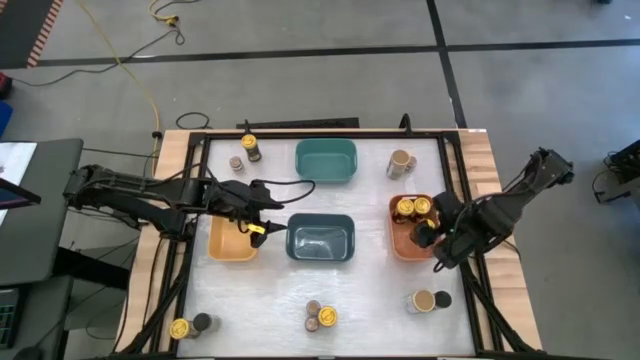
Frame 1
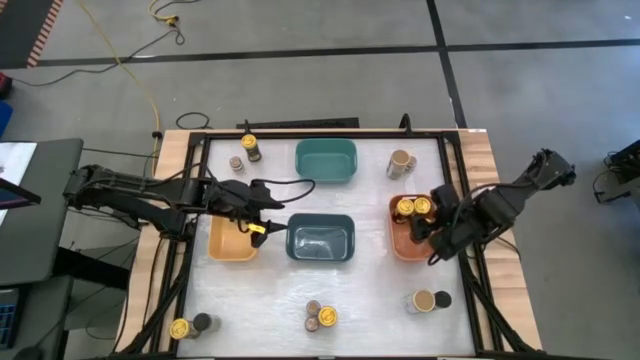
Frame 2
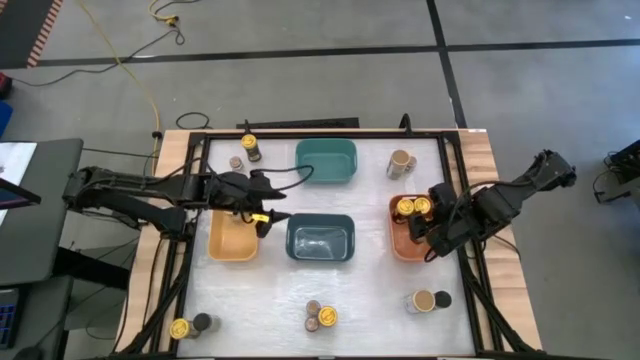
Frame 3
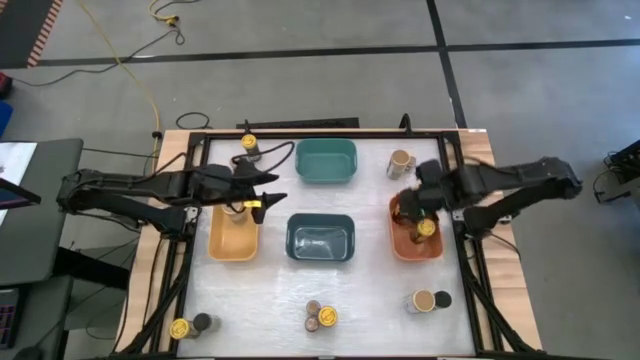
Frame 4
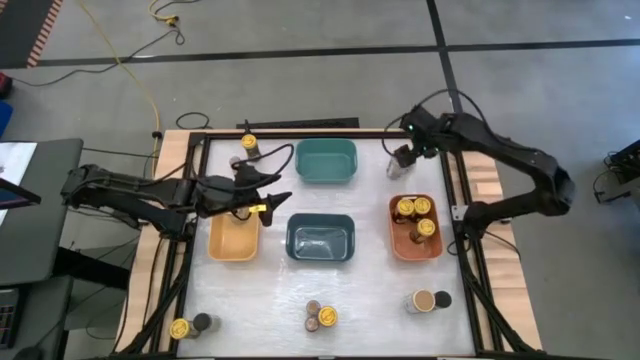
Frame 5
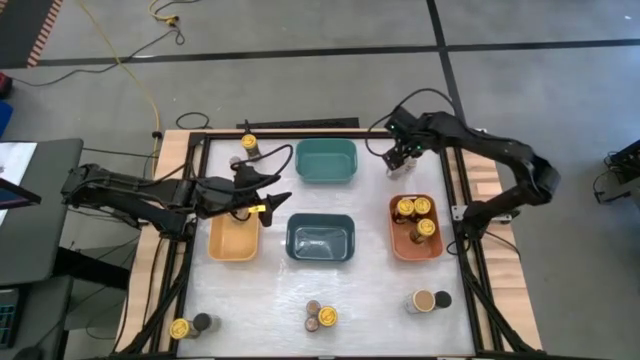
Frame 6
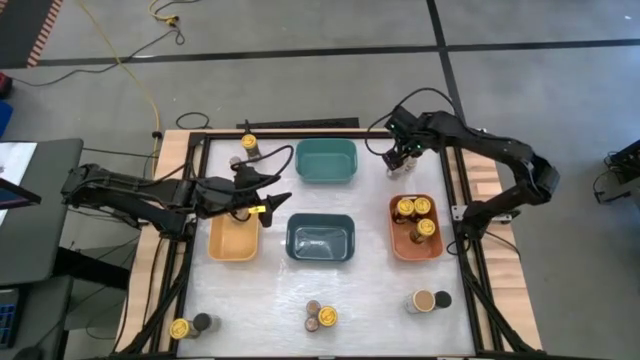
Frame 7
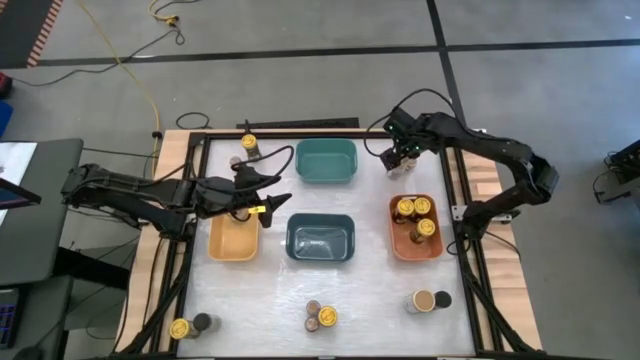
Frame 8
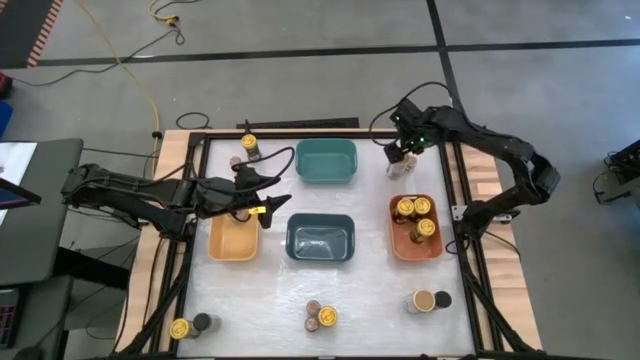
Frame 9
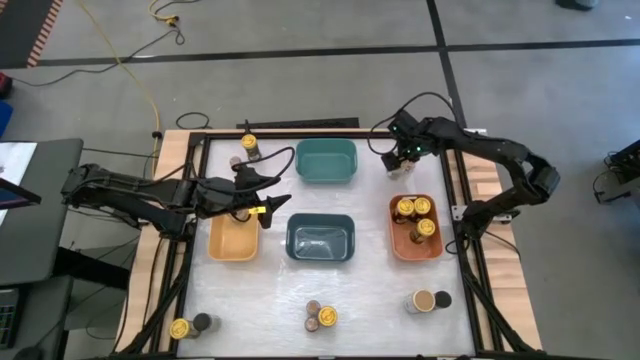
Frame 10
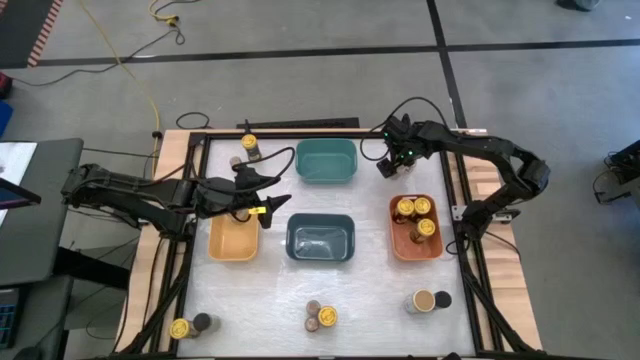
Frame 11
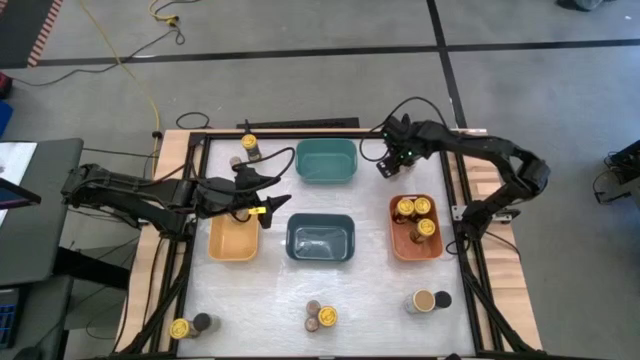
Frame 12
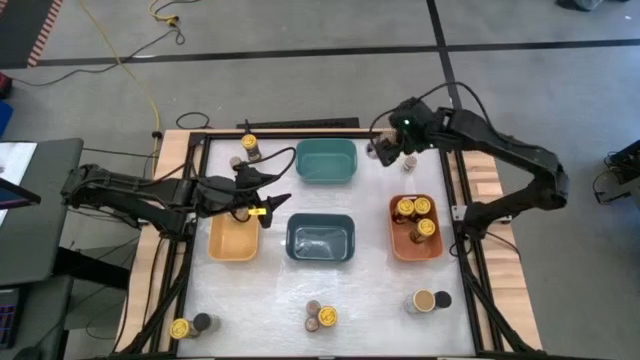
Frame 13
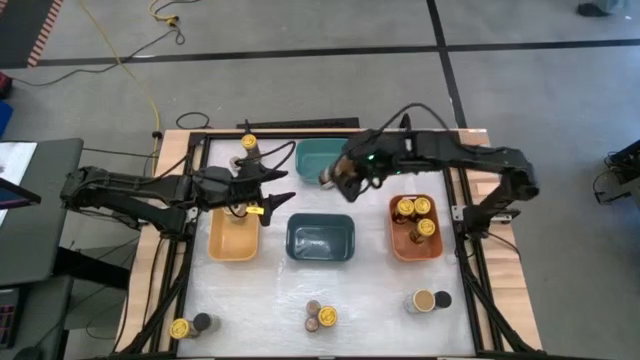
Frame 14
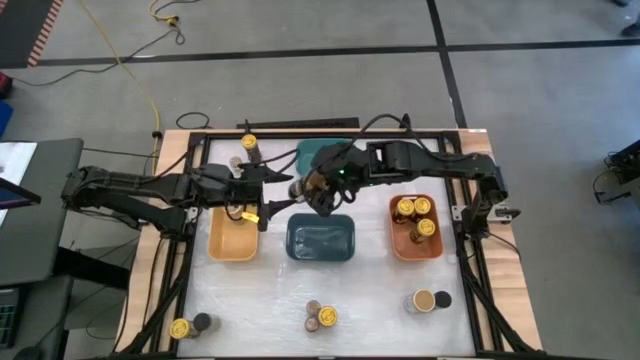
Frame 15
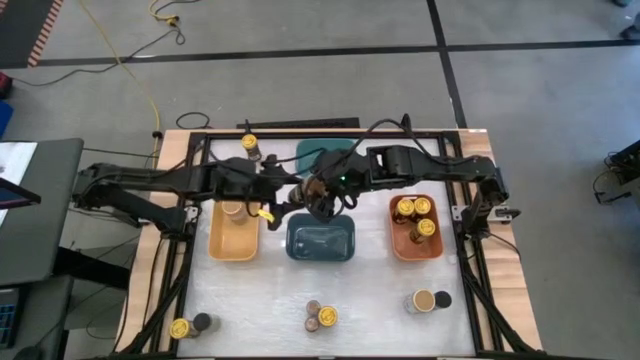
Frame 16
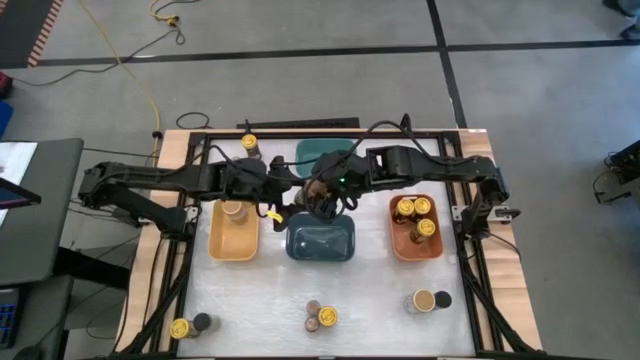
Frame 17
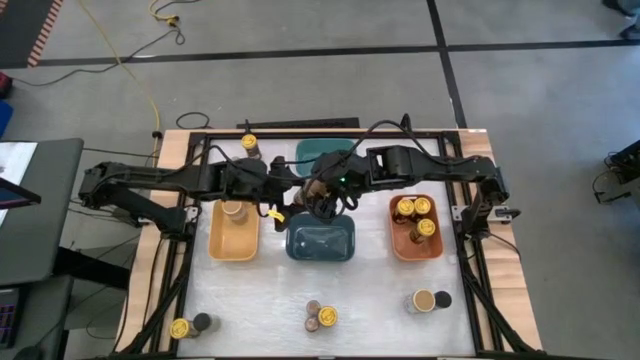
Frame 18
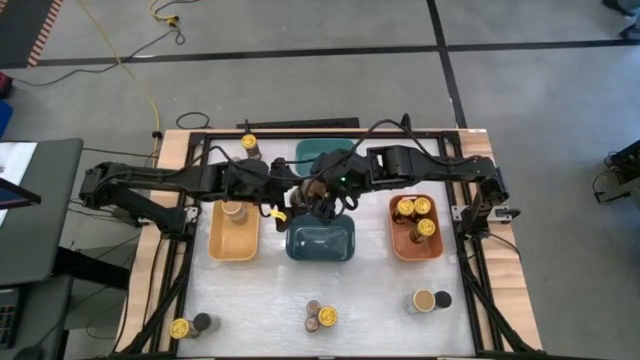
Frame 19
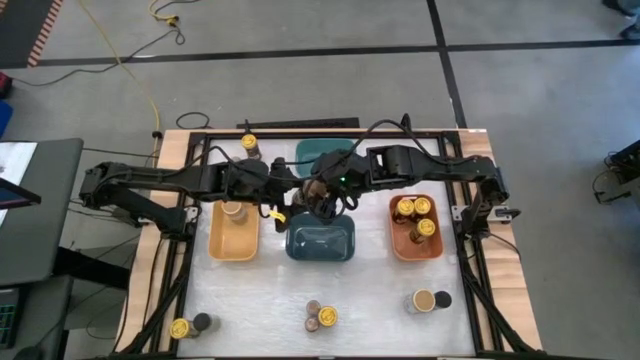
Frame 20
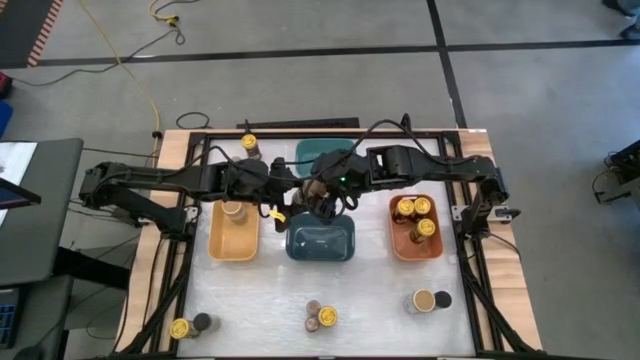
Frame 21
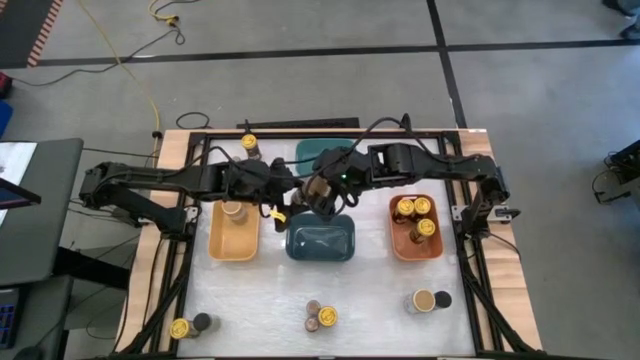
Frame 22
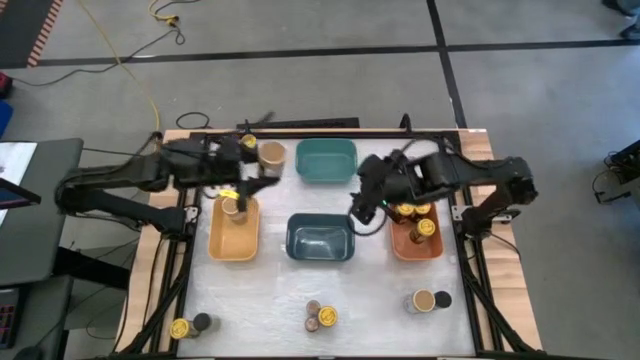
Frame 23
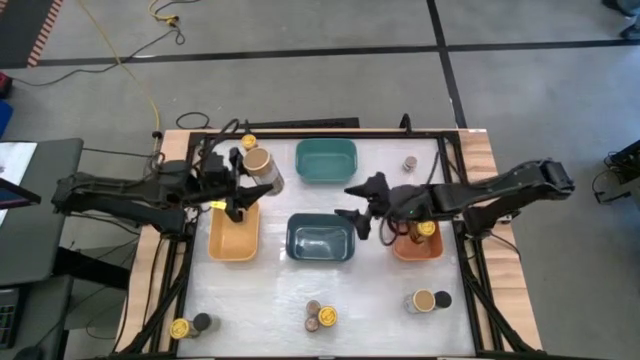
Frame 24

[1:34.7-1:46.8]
Task: Sort spices by type
Put the gold seasoning bottle into the yellow bin

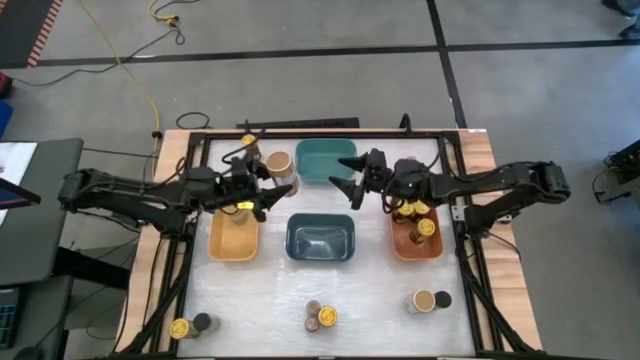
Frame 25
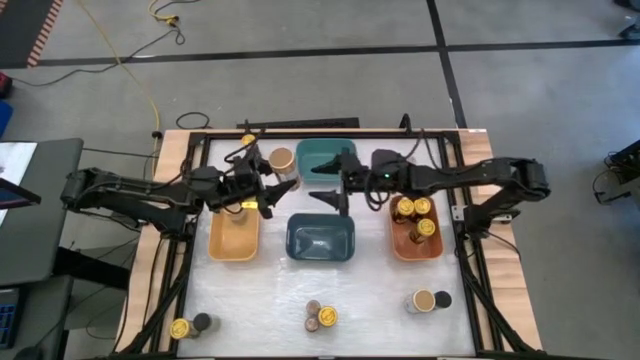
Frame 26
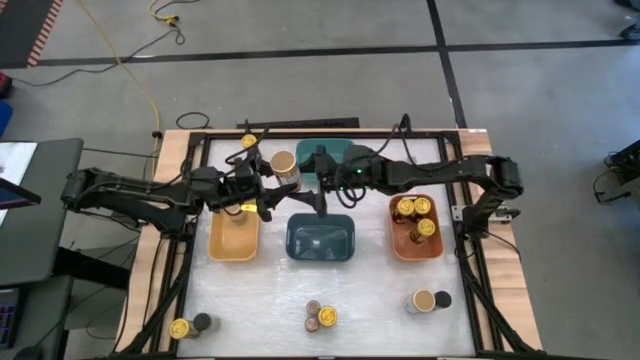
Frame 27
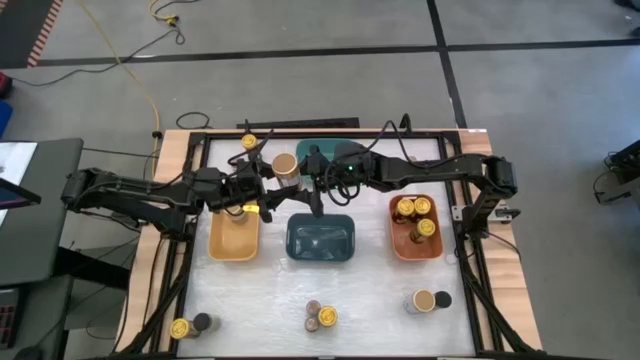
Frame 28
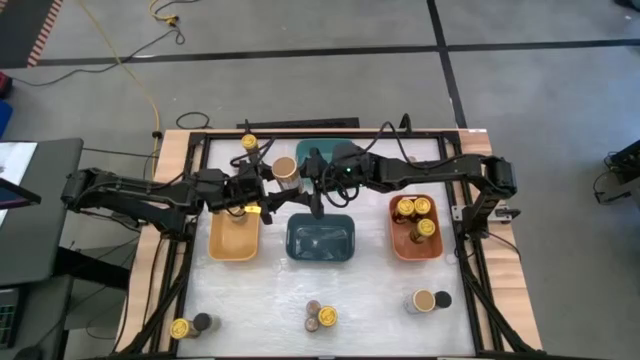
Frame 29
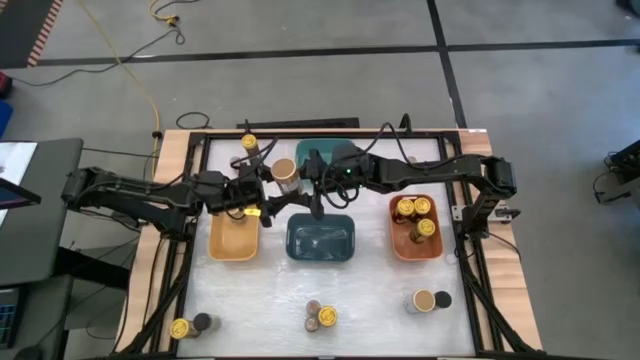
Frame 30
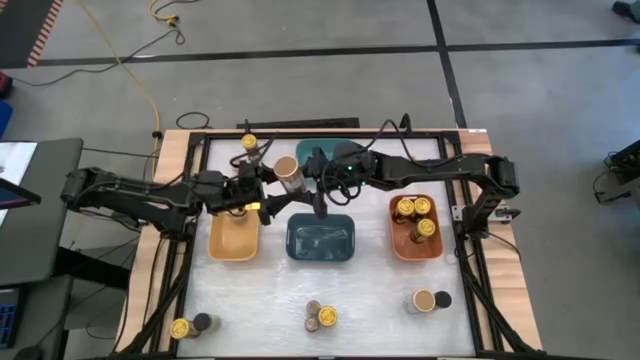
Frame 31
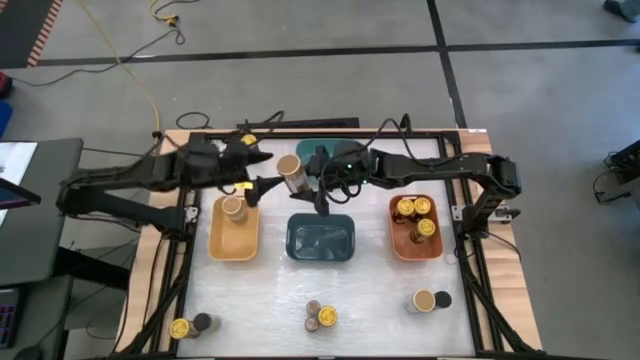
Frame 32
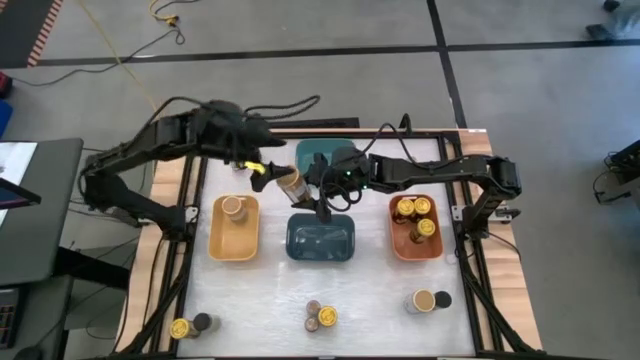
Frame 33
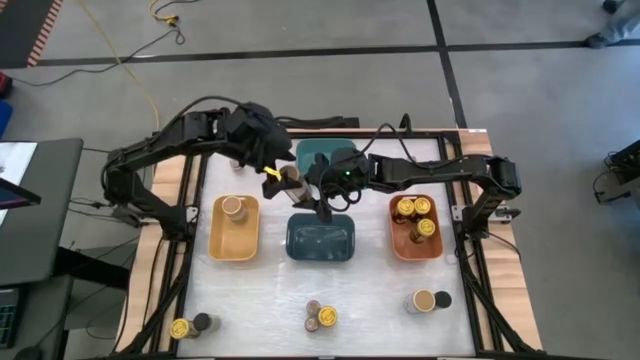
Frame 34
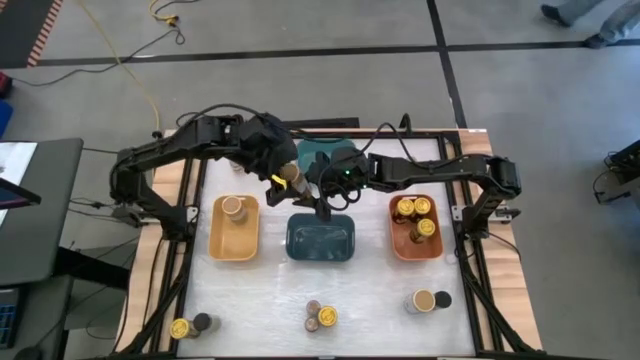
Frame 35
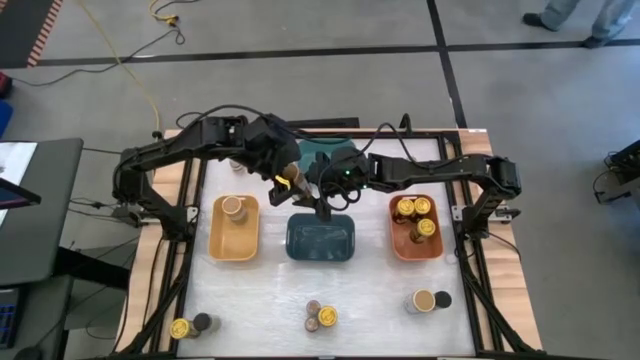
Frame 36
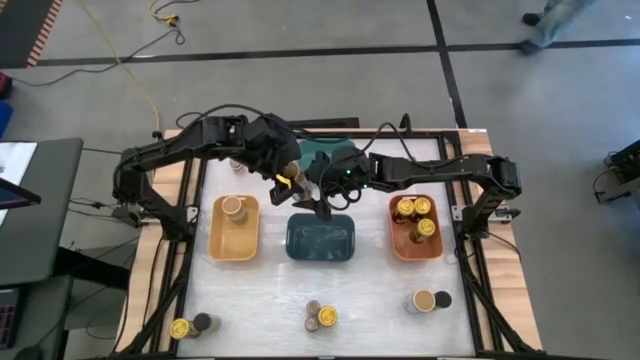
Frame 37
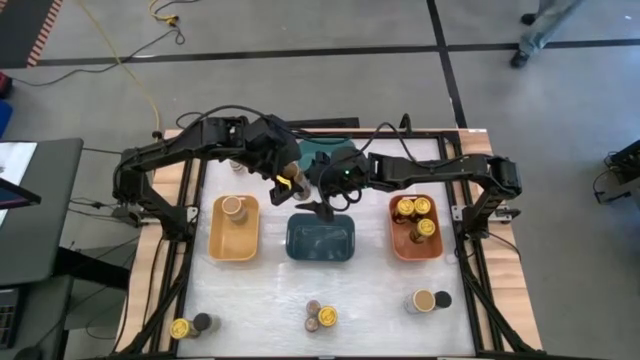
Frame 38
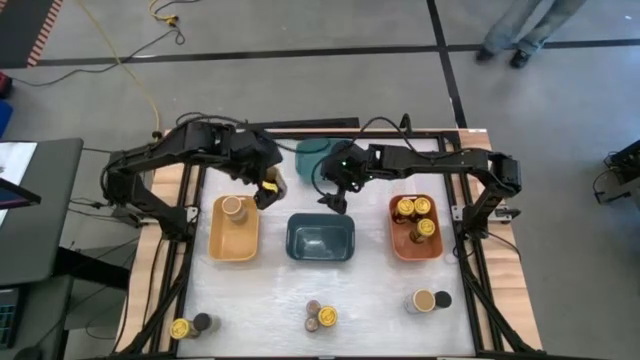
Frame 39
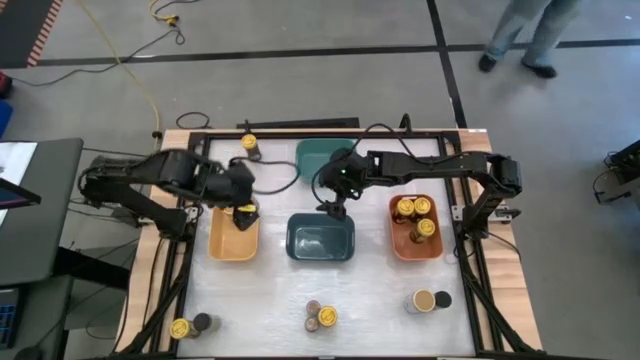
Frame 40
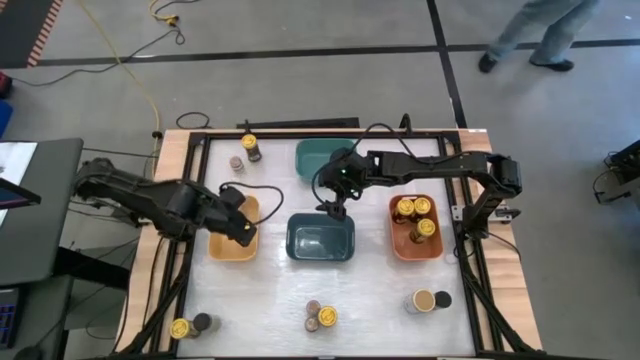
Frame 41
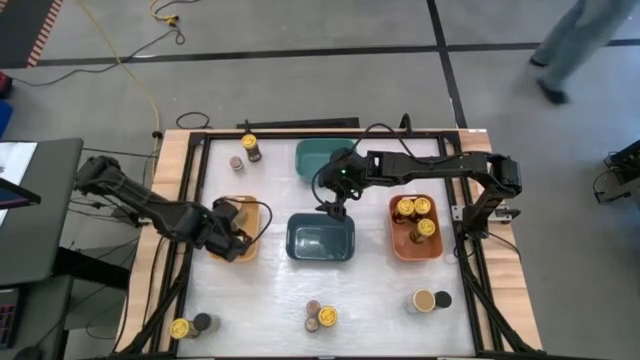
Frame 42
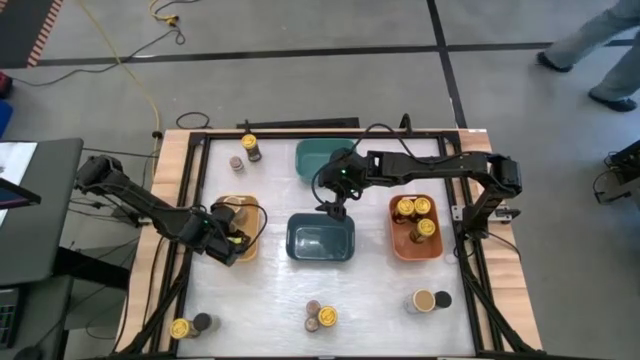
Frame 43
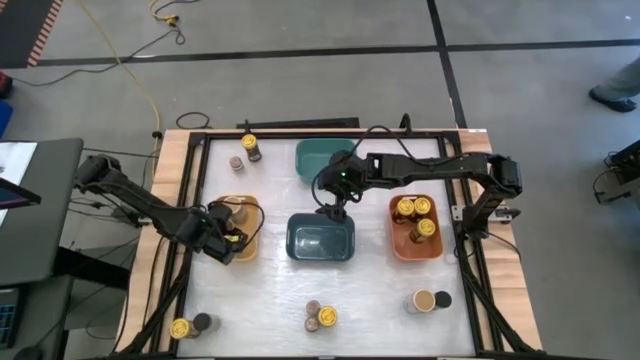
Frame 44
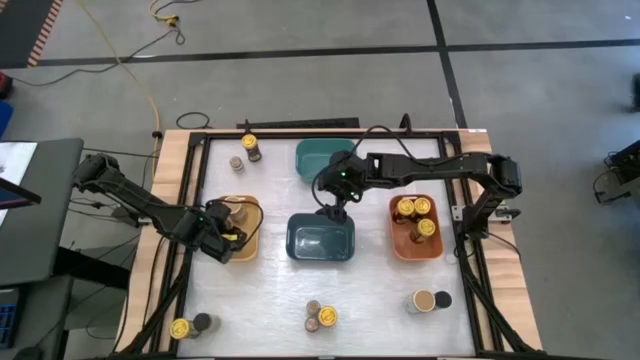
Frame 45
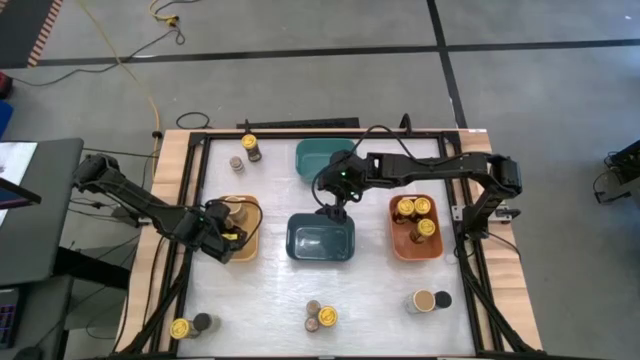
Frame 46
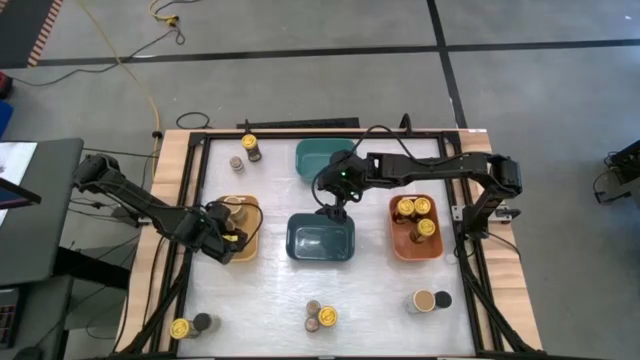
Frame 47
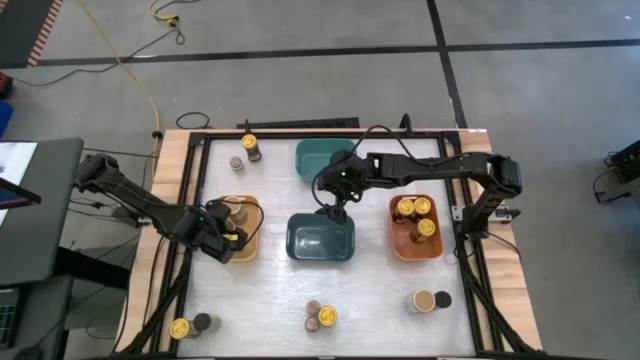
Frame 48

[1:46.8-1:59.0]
Put the gold seasoning bottle into the yellow bin
